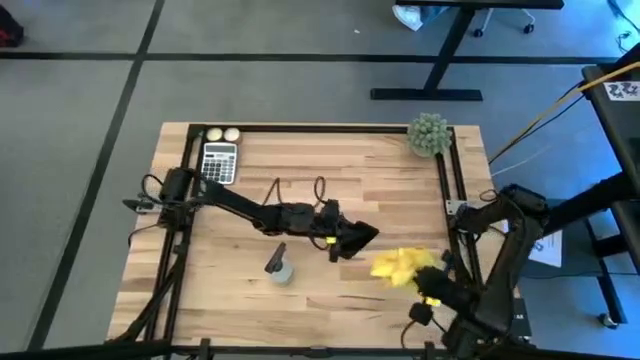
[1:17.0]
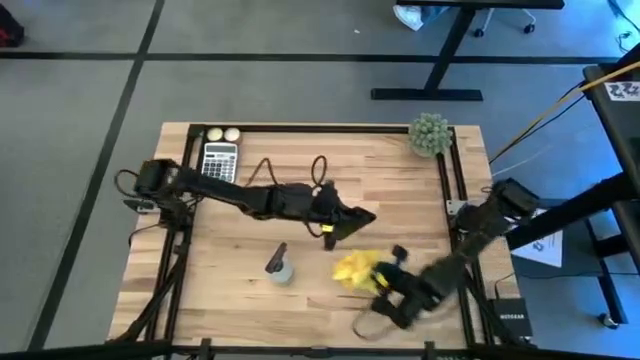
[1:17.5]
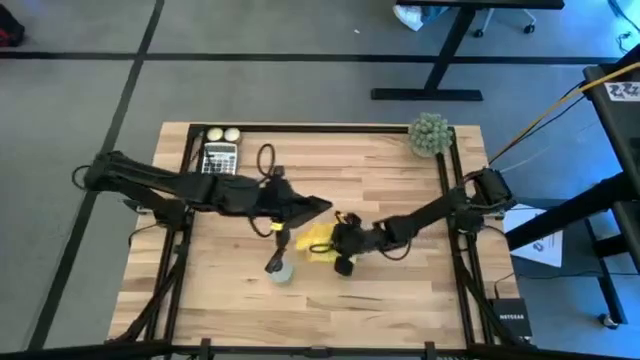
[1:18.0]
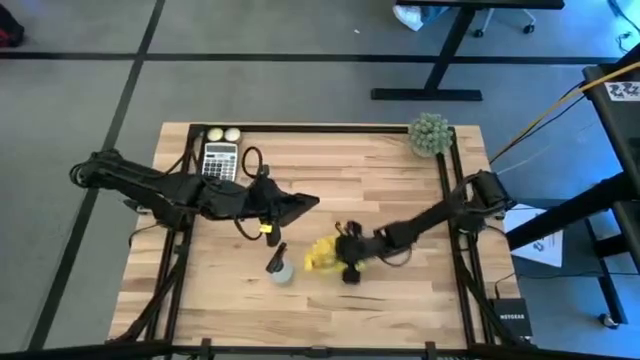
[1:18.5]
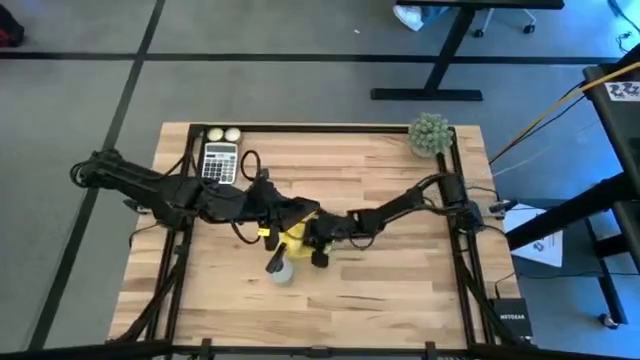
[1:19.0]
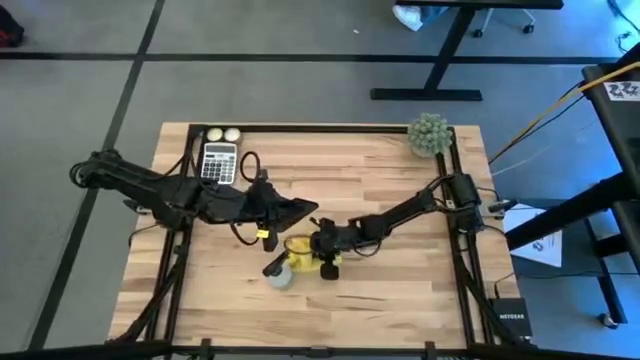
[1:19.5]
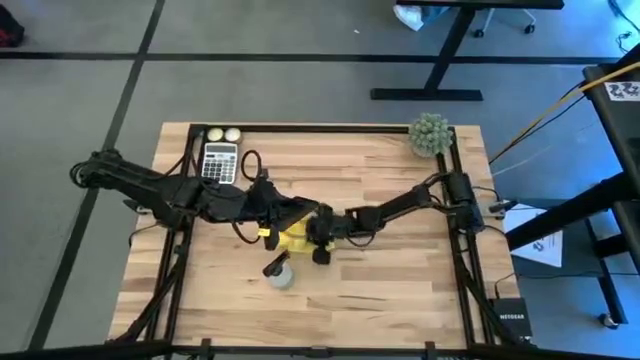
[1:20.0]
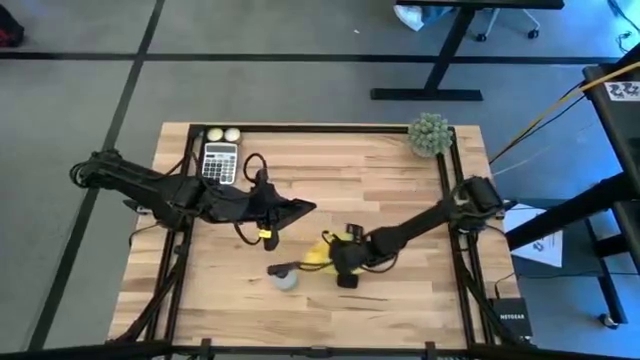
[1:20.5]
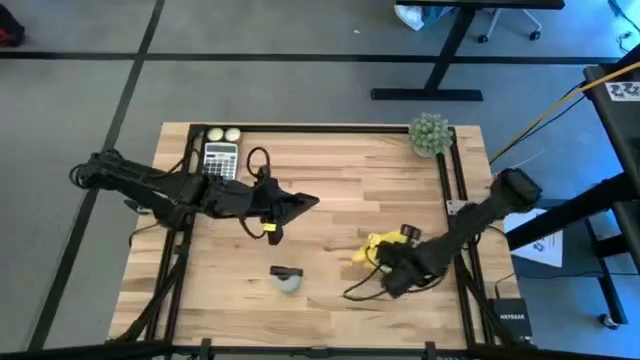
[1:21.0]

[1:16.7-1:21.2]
Task: Apply microfiber cloth
Wipe the middle of the table with yellow microfiber cloth

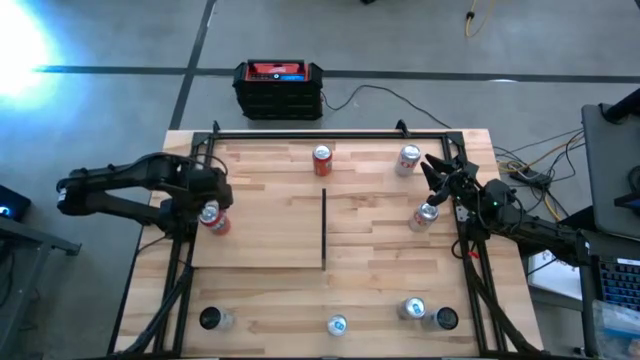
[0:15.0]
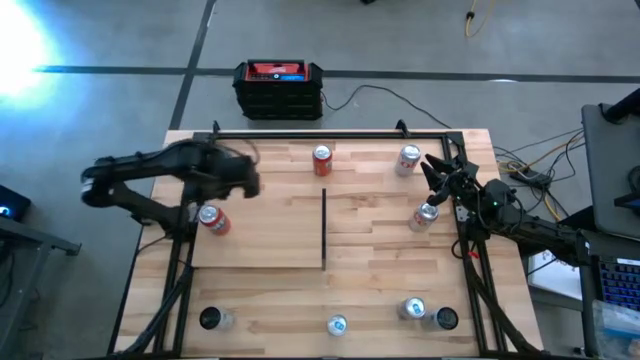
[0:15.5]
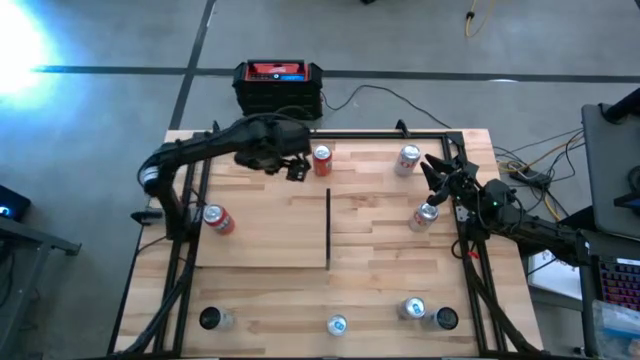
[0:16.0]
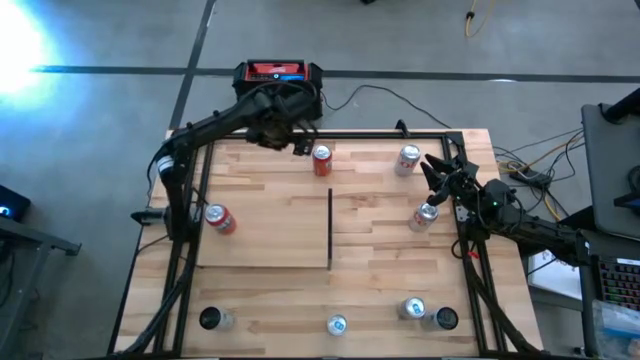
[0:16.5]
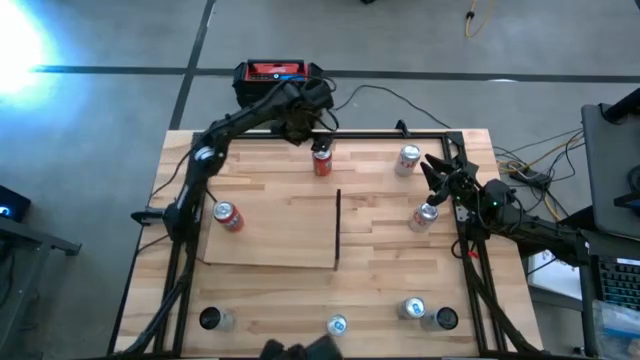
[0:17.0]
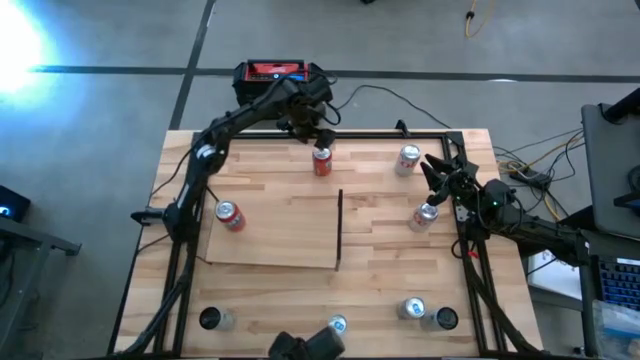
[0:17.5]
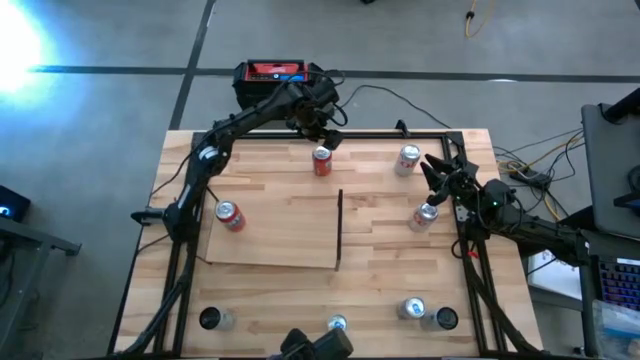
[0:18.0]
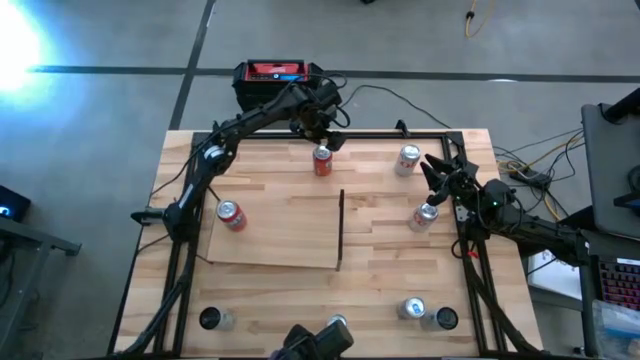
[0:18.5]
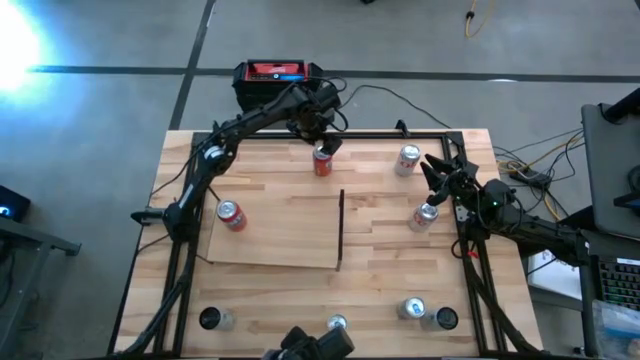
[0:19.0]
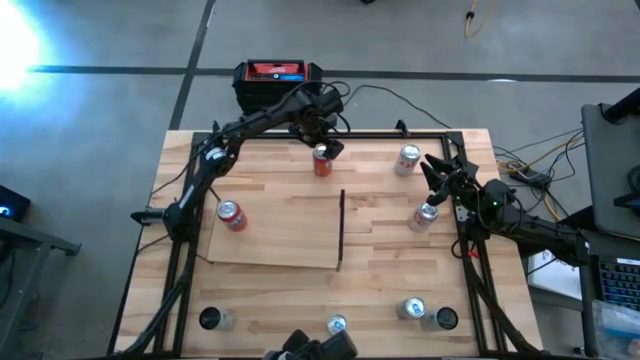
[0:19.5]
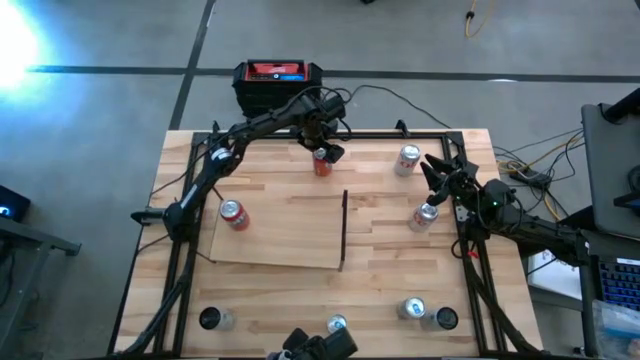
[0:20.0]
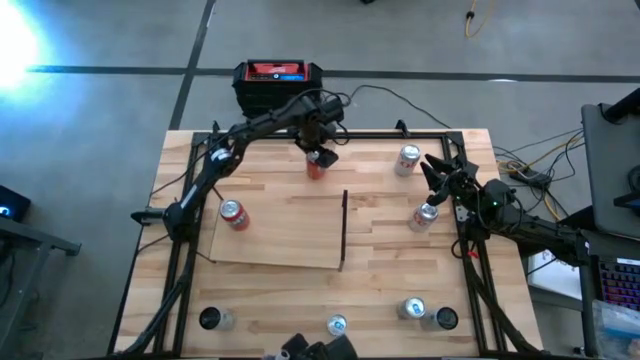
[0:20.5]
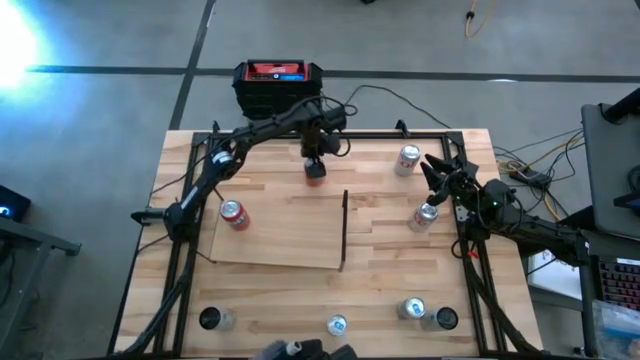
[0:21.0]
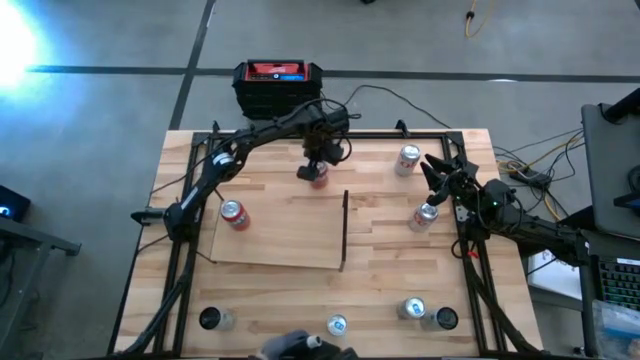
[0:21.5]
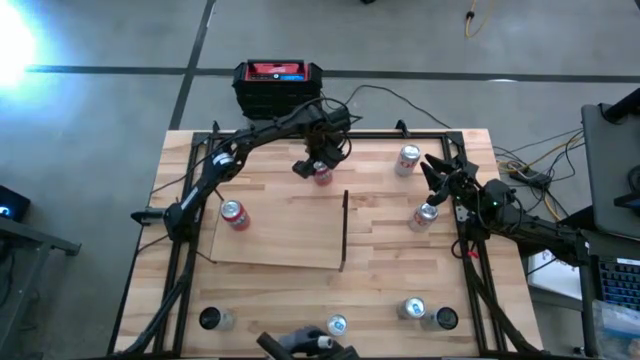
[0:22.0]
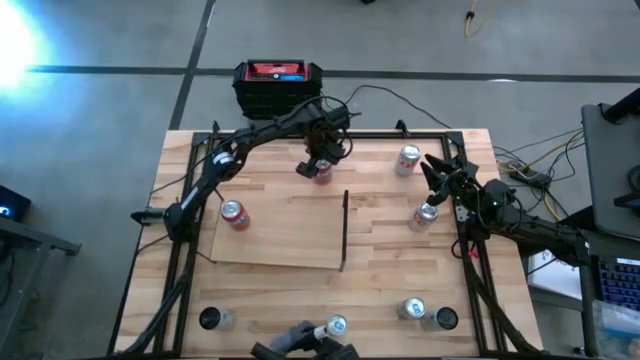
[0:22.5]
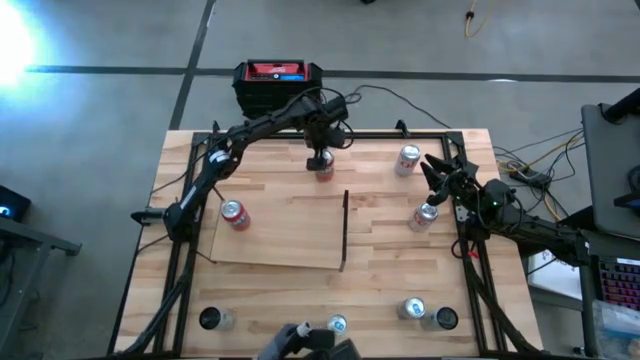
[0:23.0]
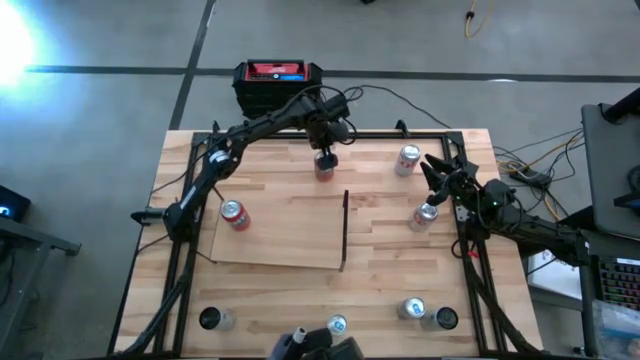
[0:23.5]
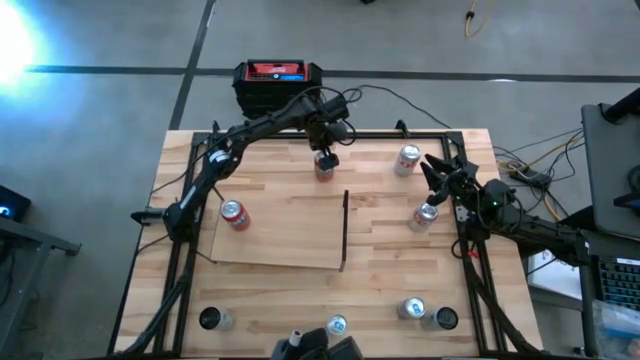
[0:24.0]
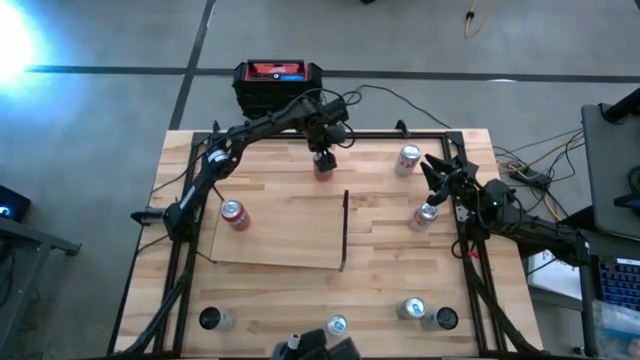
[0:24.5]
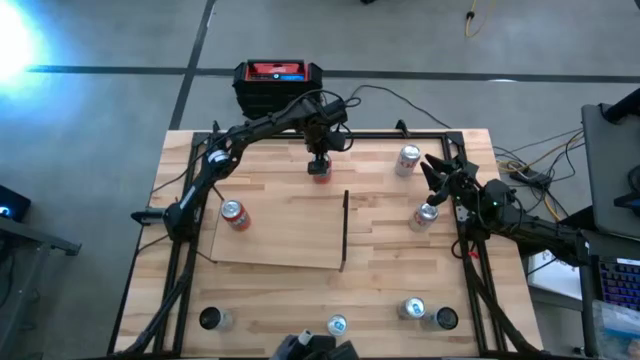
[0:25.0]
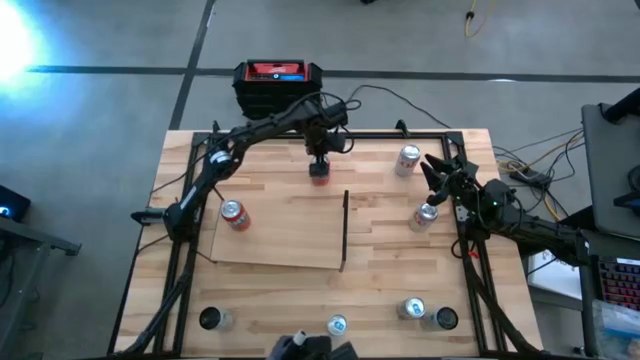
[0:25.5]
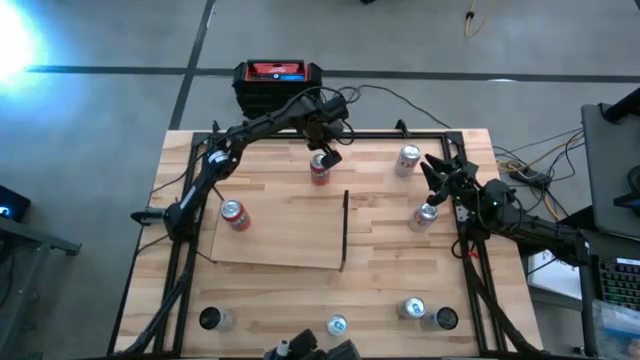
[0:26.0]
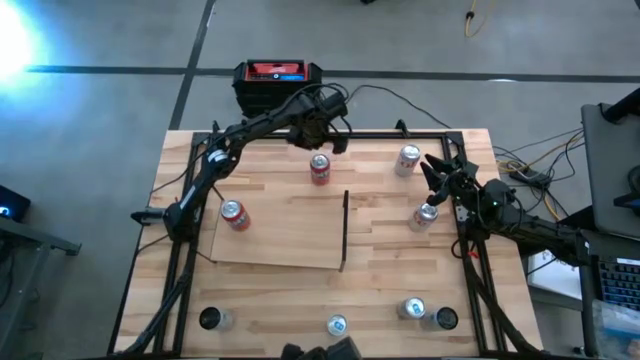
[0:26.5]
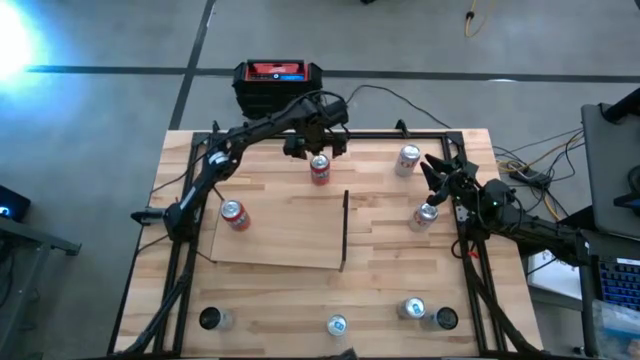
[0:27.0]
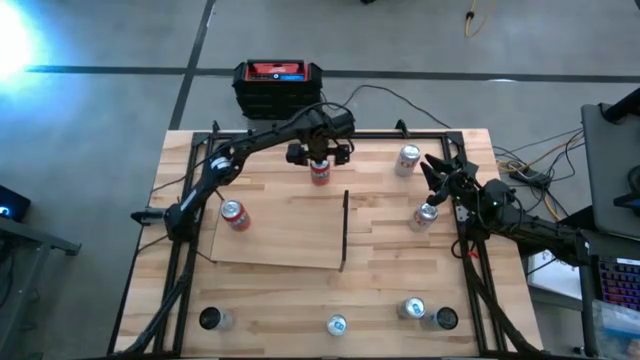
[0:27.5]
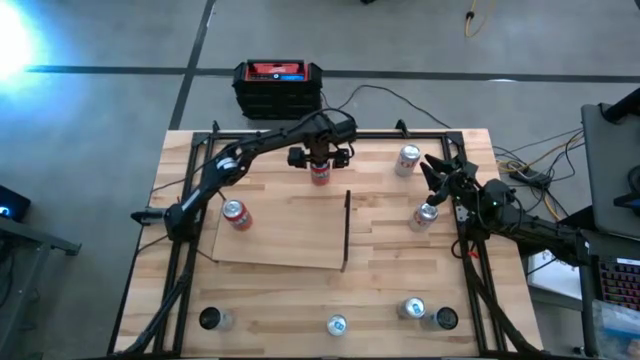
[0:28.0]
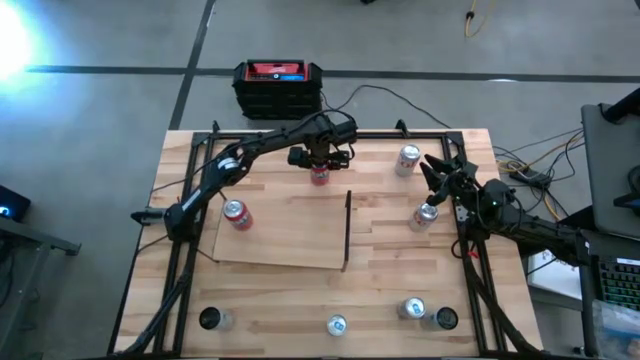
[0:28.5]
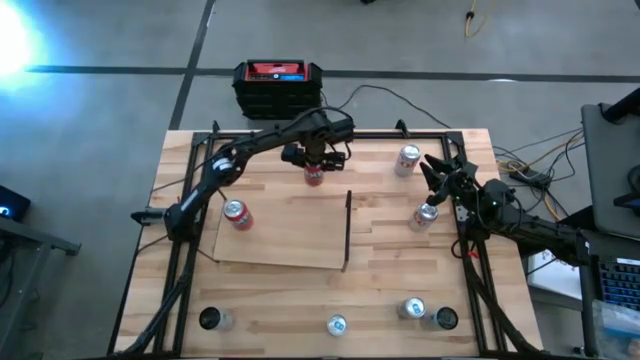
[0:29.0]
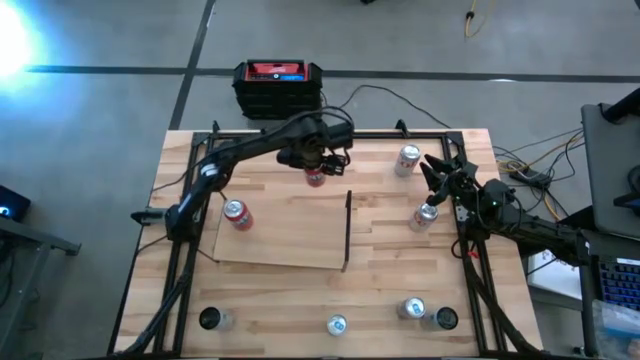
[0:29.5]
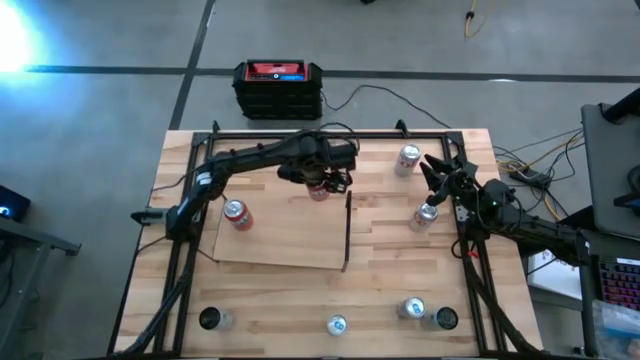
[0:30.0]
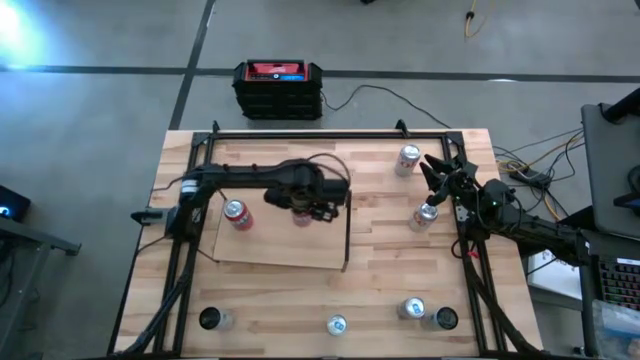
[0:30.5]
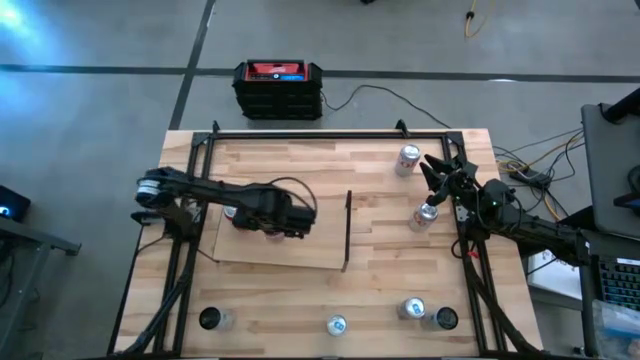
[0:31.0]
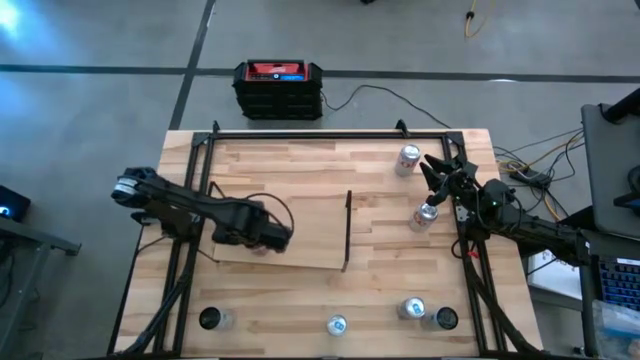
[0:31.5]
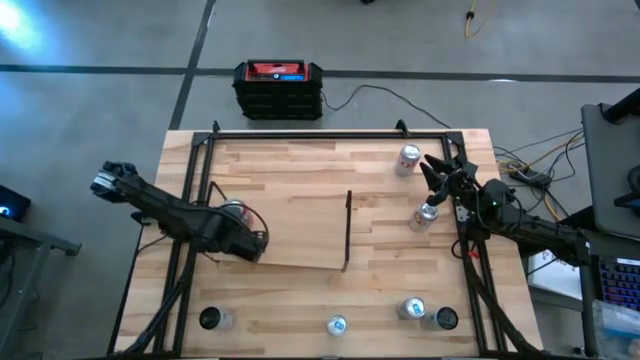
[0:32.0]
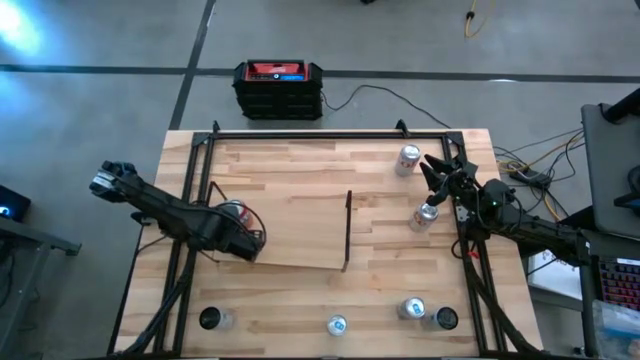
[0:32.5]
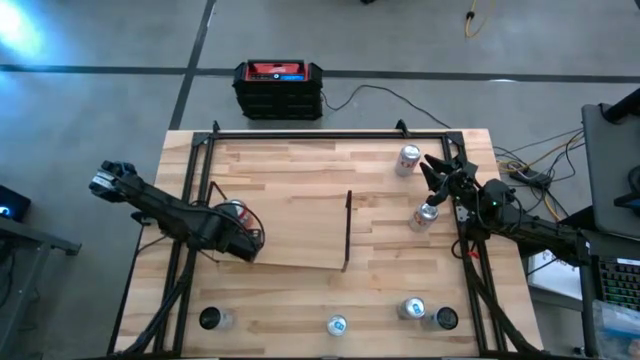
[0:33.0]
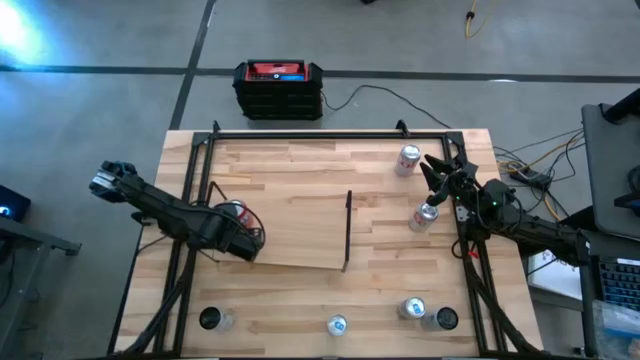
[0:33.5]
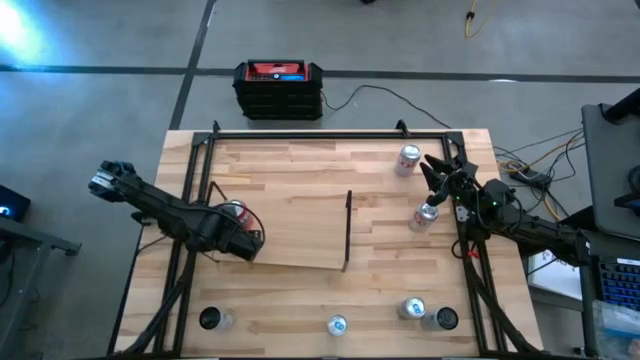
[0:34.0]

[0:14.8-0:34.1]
Task: Place canned beverage on shelf
Put the red soda can on the shelf aligned with the other red soda can
